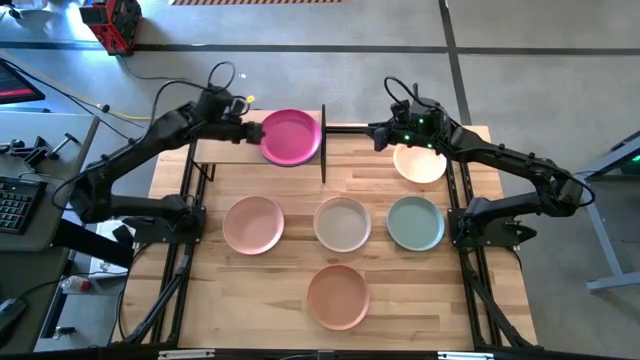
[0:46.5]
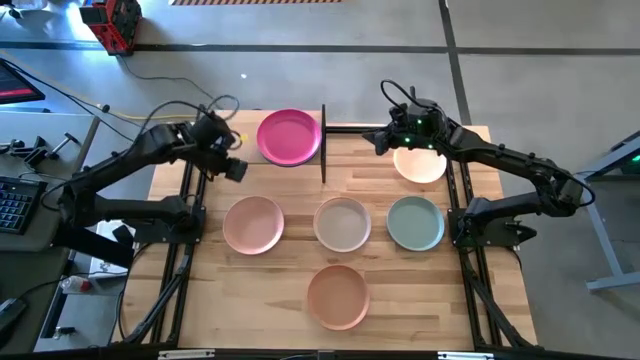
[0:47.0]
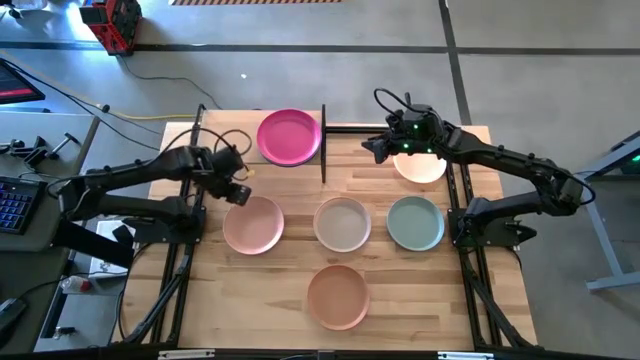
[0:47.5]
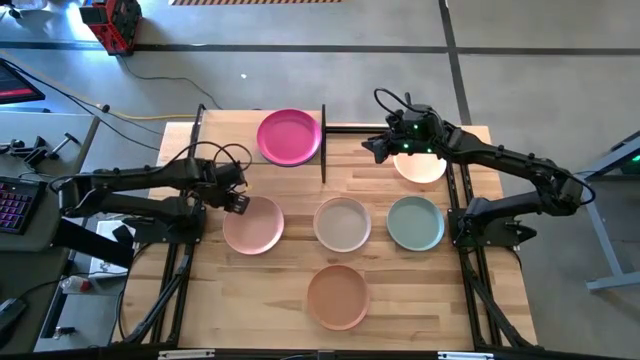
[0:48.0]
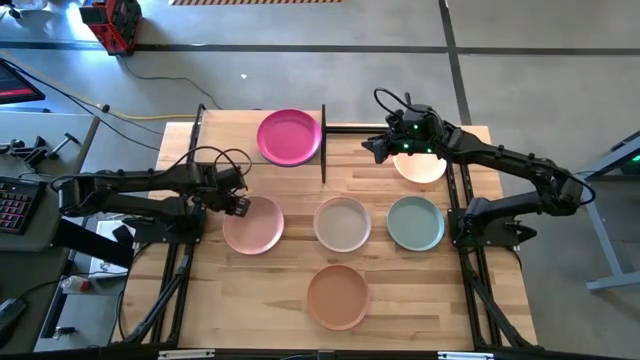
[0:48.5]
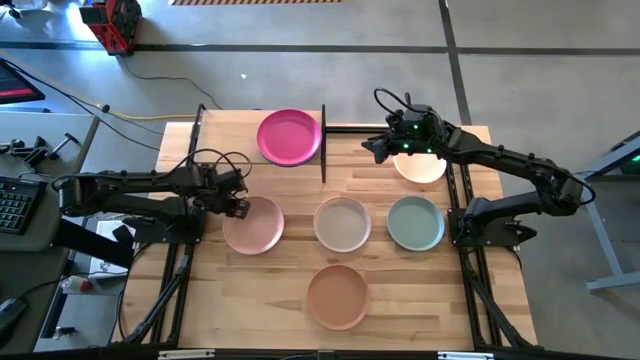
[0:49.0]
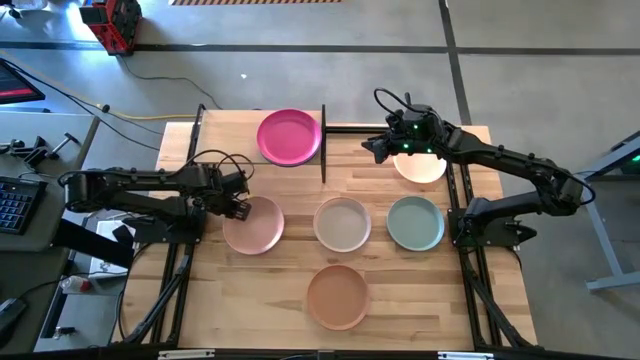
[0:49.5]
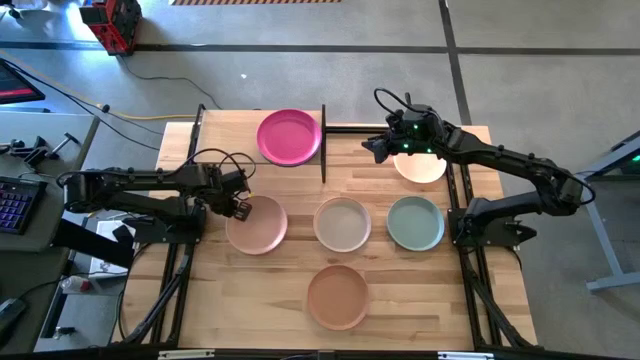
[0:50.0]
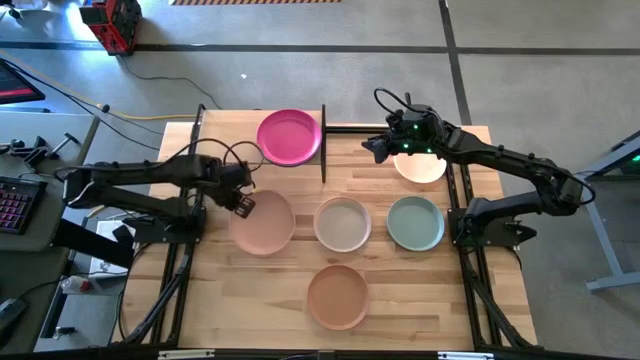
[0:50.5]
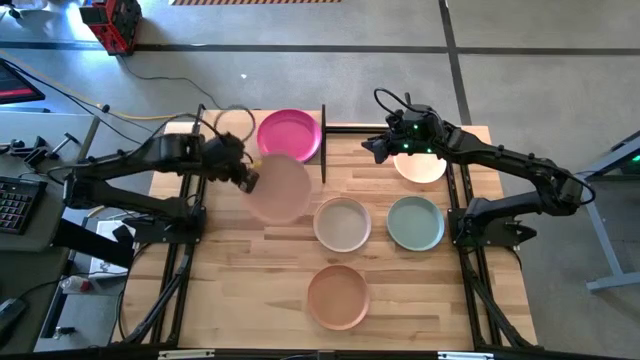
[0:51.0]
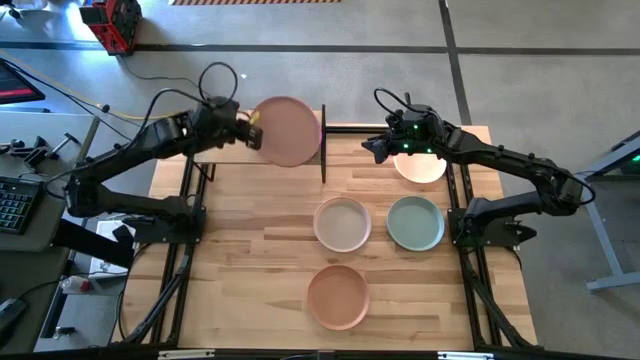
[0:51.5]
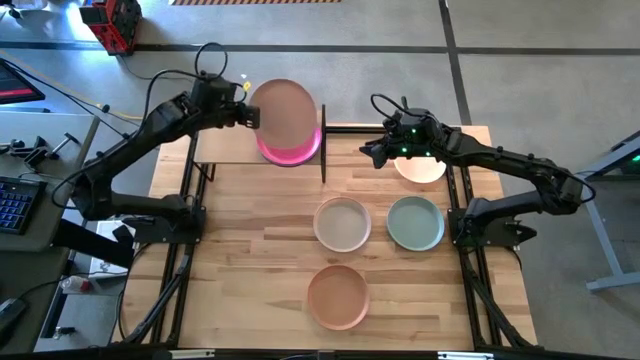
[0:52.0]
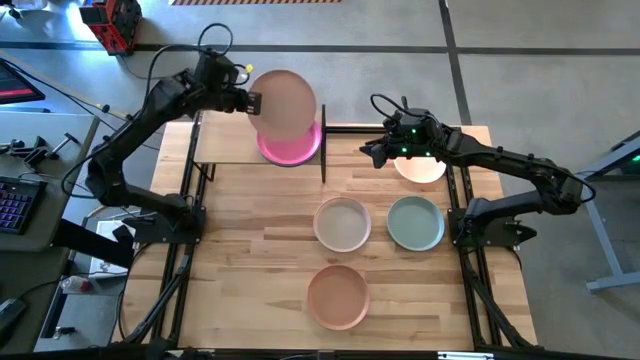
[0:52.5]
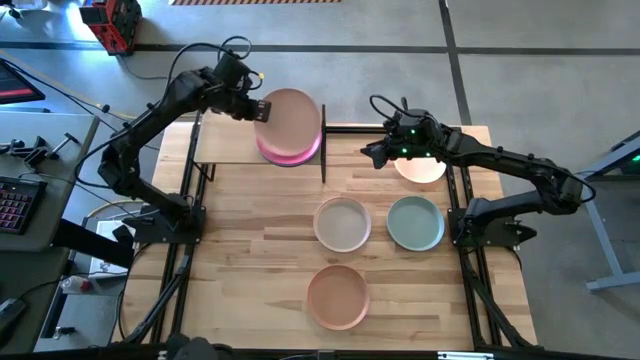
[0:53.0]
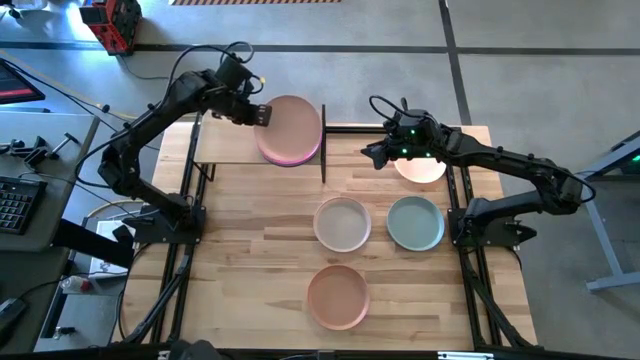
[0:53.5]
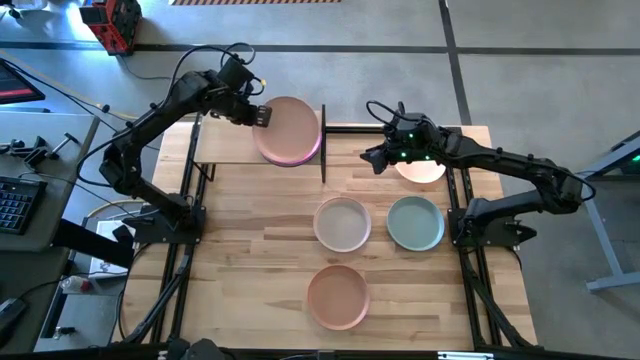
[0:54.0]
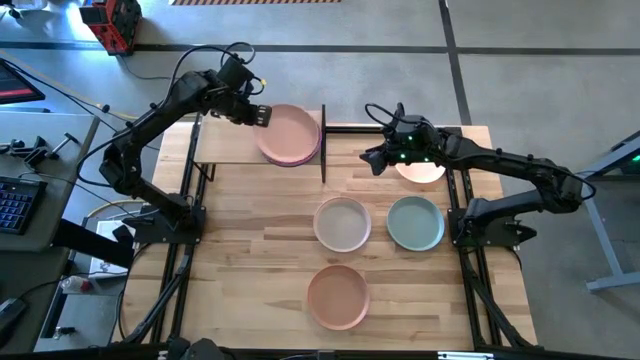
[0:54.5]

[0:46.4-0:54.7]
Task: Place and stack plates onto a shelf
Stack the light pink plate on top of the pink plate on the shelf

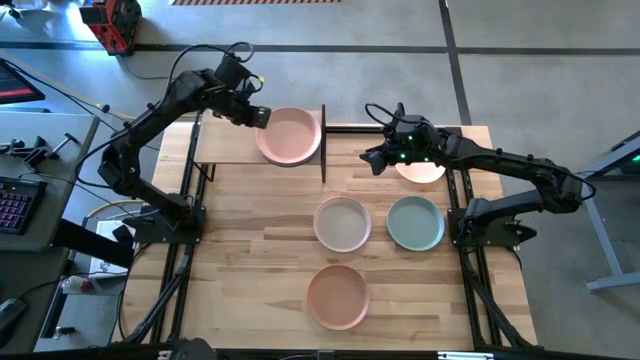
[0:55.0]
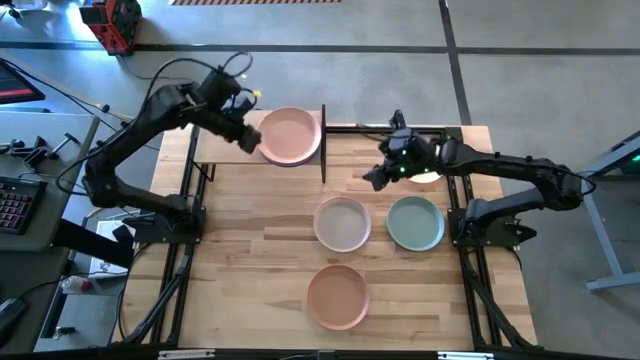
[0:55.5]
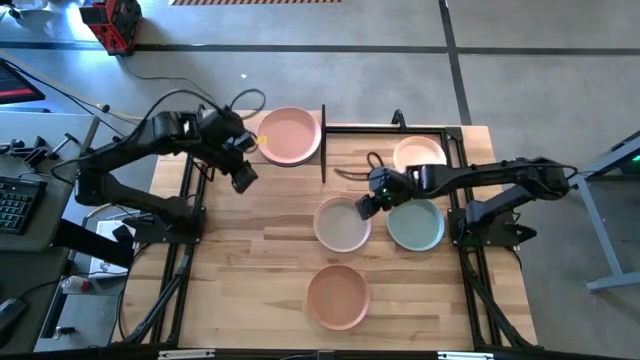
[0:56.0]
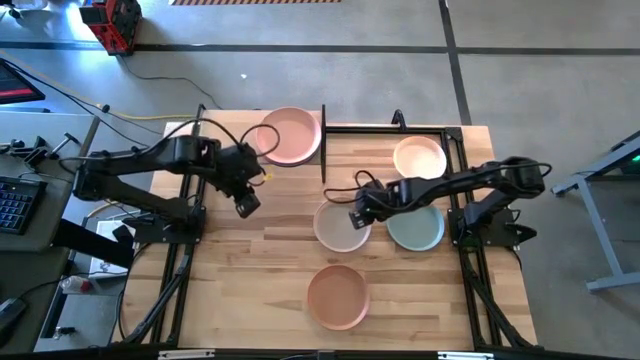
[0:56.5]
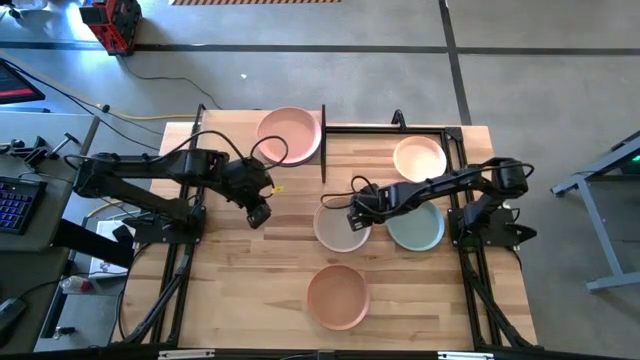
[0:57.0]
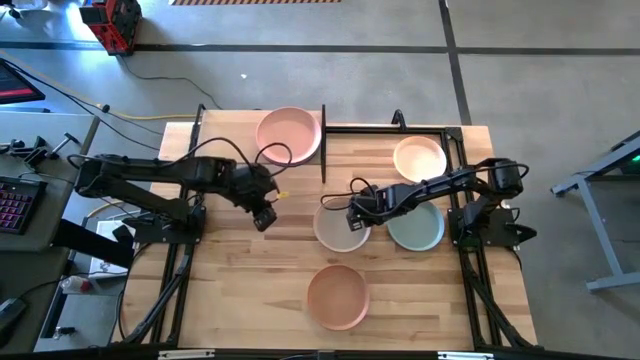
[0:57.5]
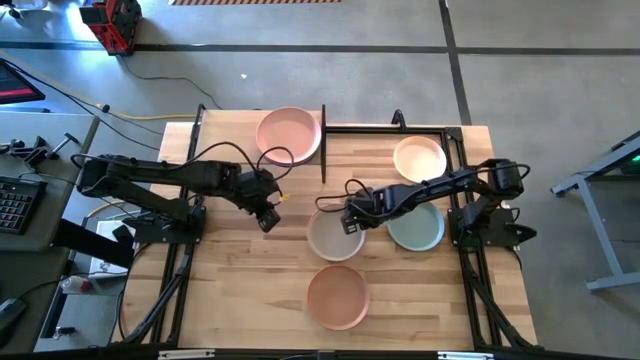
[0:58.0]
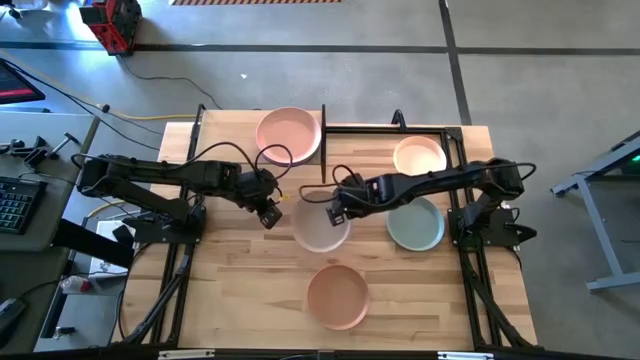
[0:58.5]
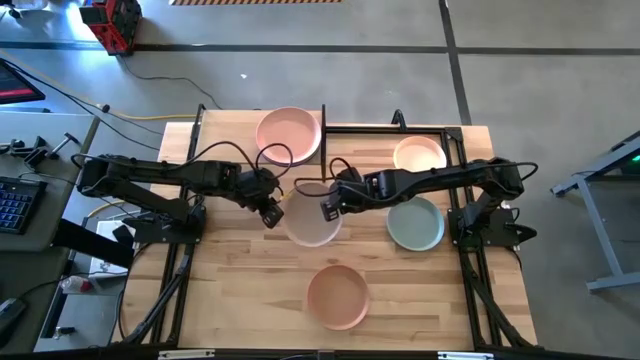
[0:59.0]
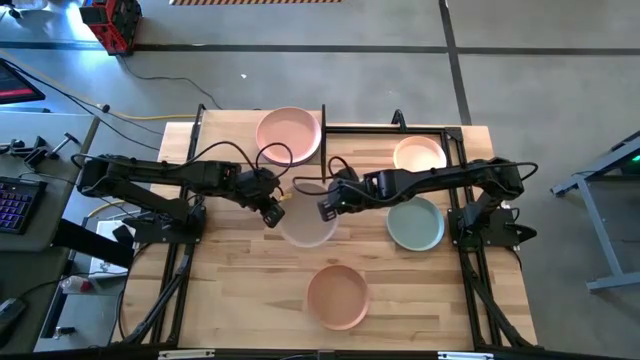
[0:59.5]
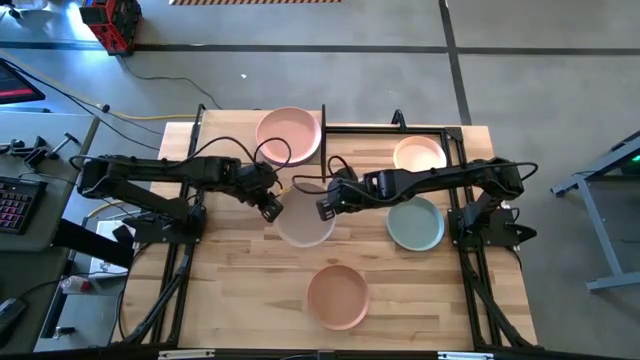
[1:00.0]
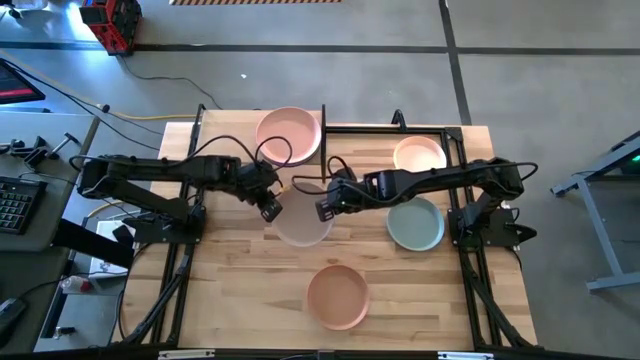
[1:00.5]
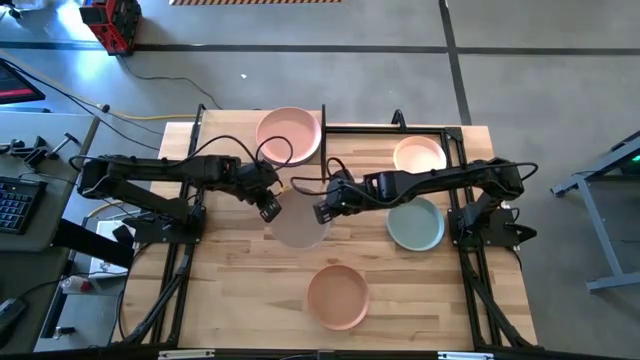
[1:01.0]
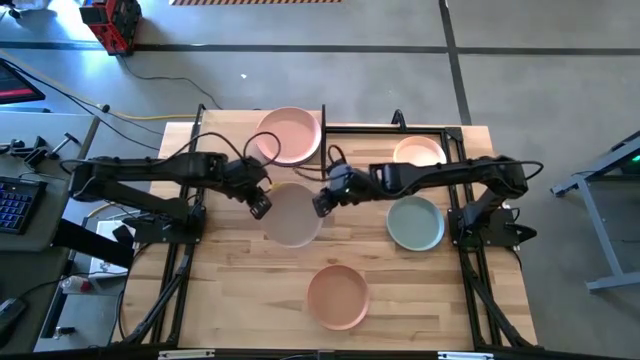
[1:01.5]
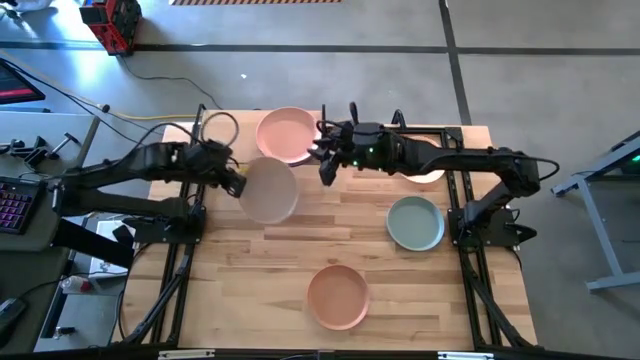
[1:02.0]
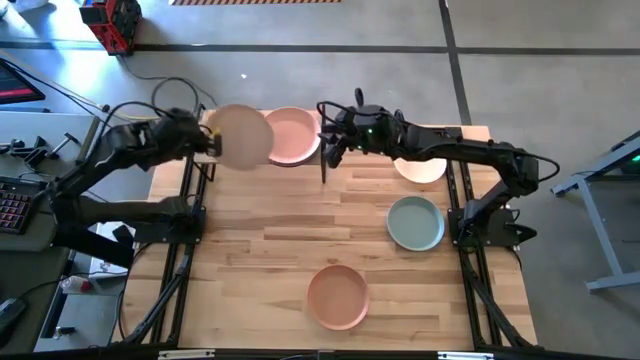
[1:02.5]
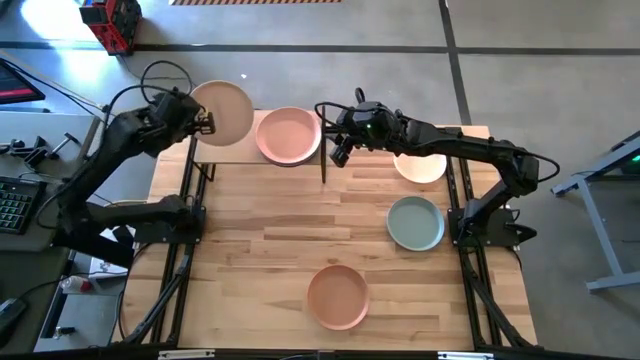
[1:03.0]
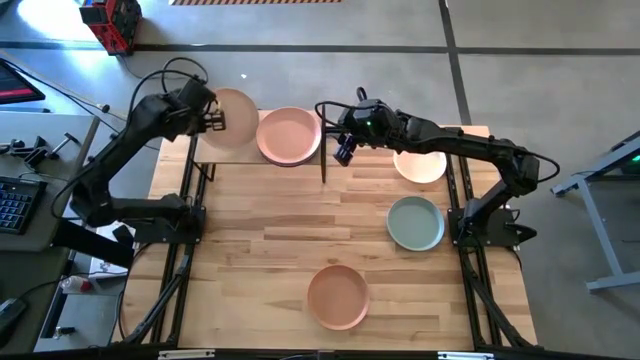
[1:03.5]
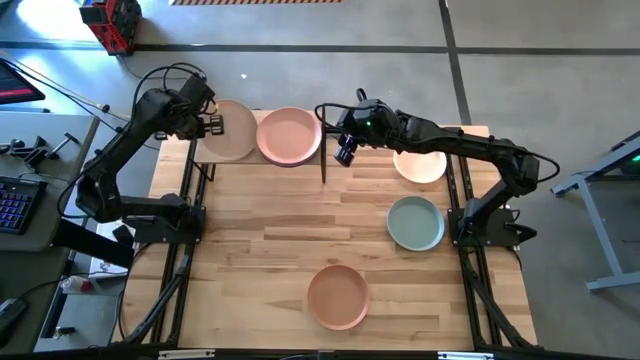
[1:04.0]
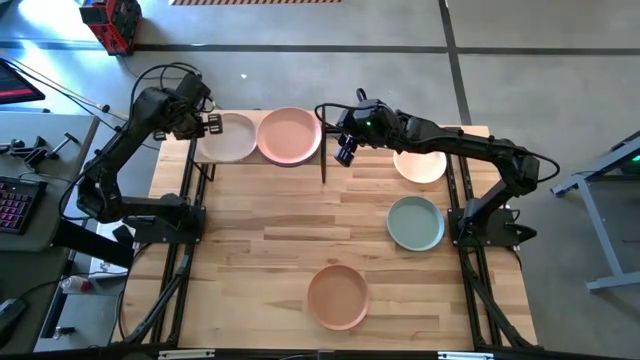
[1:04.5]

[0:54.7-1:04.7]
Put the light white plate on the shelf
